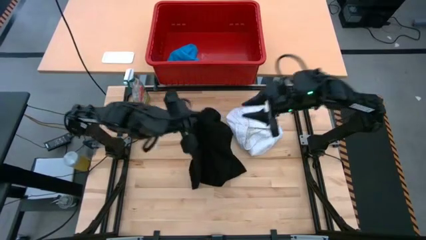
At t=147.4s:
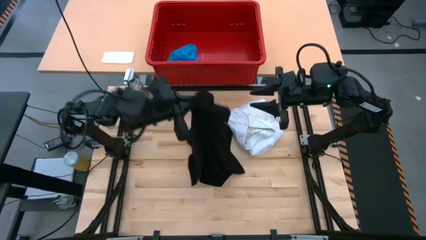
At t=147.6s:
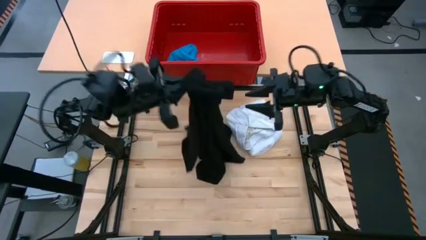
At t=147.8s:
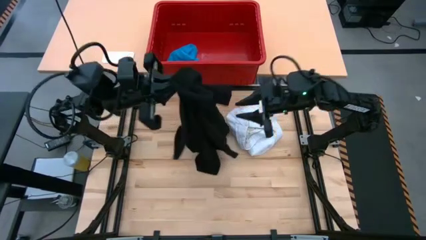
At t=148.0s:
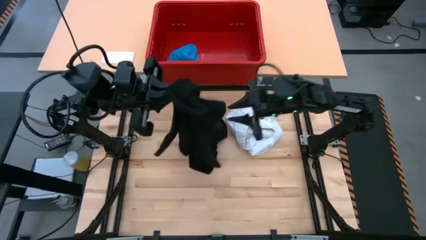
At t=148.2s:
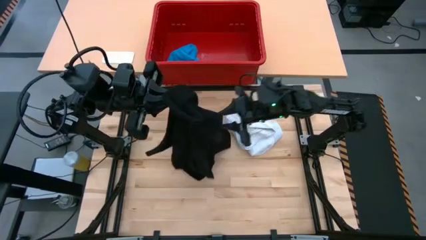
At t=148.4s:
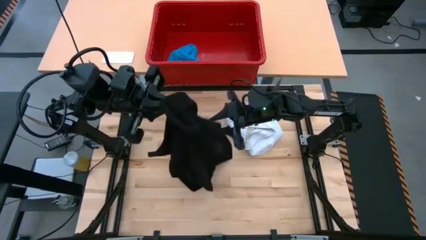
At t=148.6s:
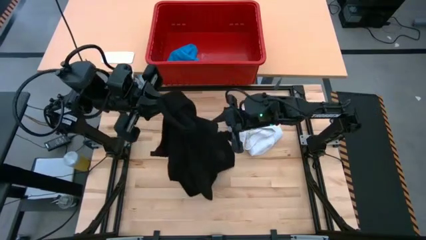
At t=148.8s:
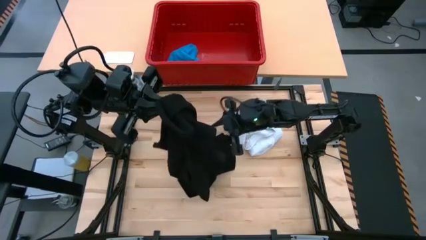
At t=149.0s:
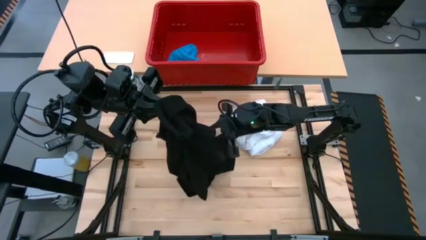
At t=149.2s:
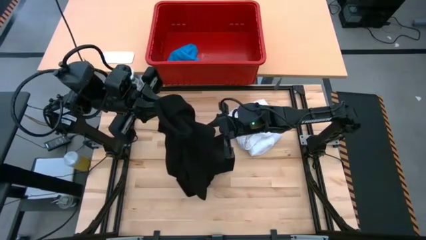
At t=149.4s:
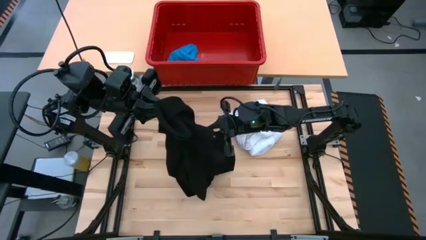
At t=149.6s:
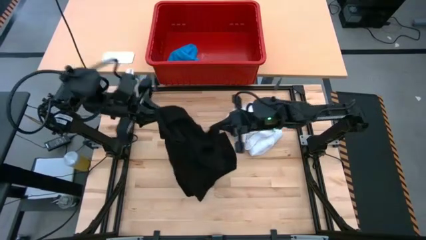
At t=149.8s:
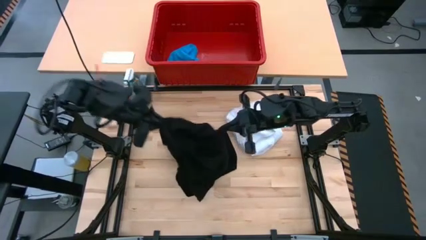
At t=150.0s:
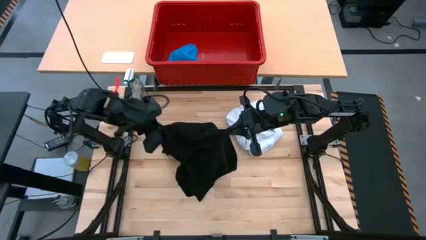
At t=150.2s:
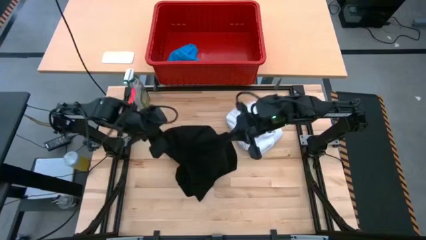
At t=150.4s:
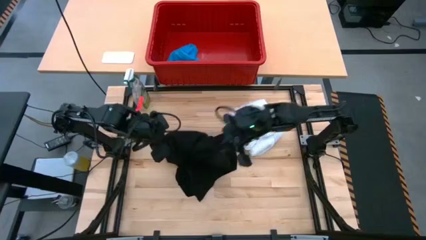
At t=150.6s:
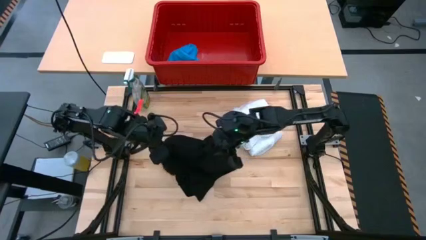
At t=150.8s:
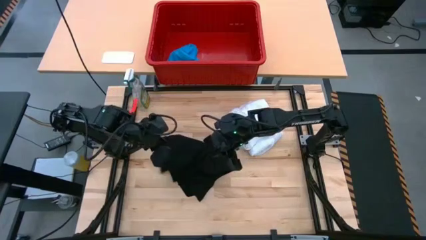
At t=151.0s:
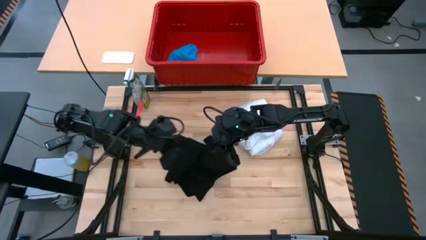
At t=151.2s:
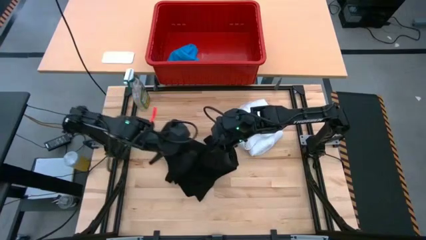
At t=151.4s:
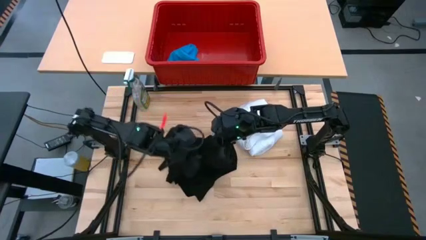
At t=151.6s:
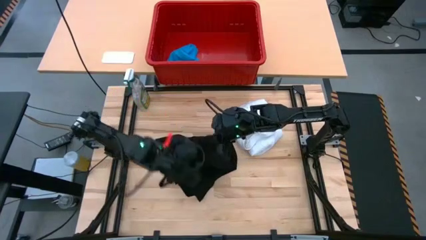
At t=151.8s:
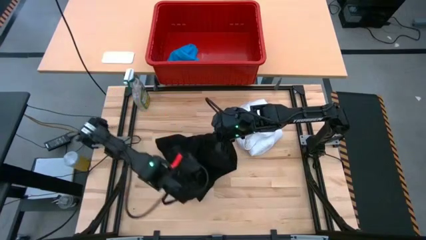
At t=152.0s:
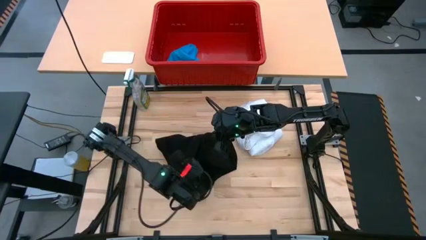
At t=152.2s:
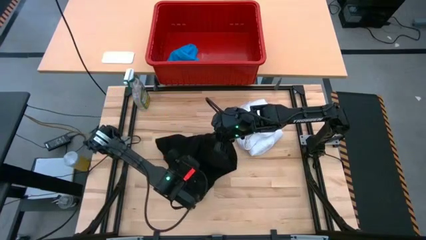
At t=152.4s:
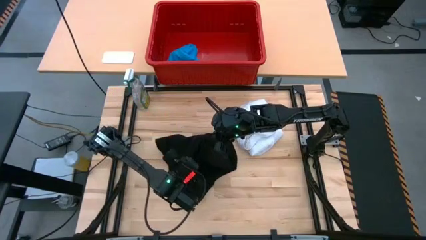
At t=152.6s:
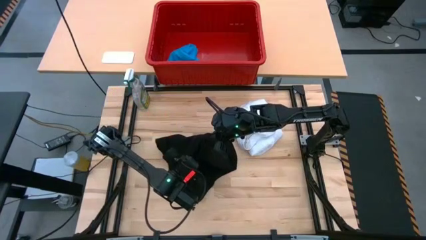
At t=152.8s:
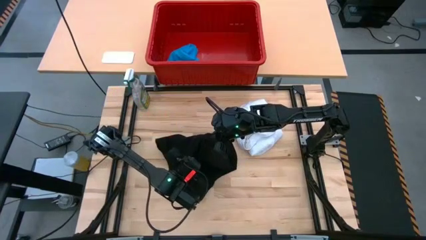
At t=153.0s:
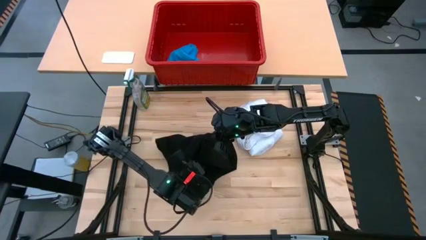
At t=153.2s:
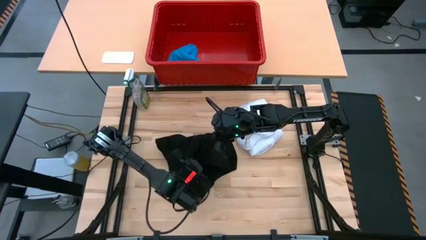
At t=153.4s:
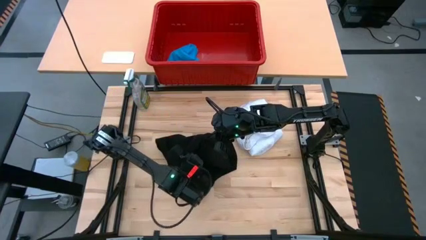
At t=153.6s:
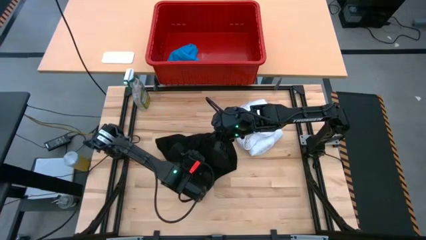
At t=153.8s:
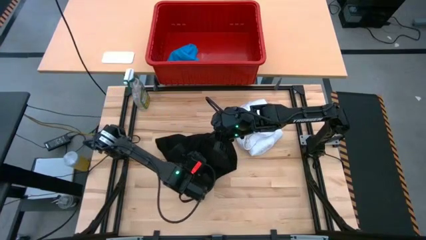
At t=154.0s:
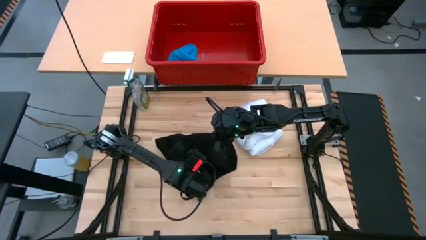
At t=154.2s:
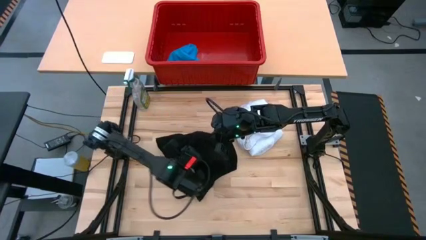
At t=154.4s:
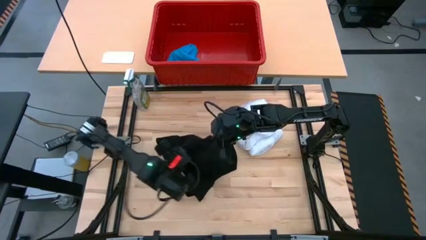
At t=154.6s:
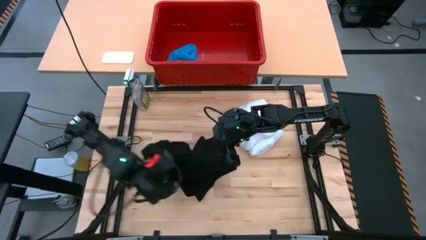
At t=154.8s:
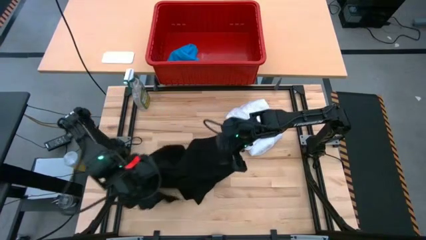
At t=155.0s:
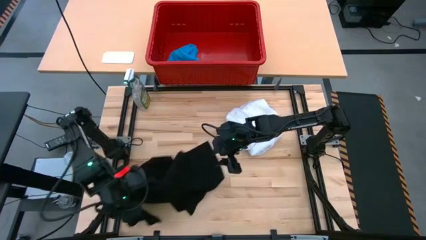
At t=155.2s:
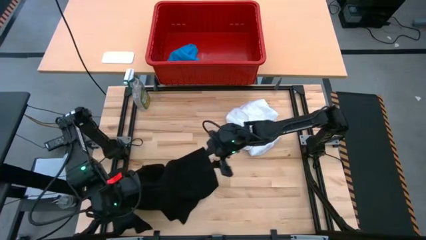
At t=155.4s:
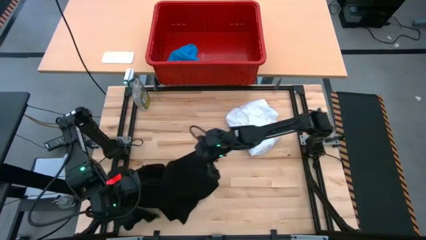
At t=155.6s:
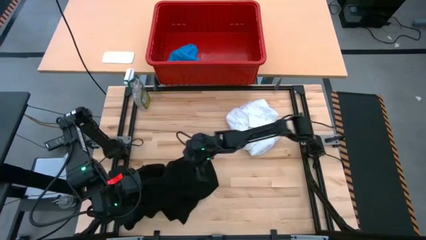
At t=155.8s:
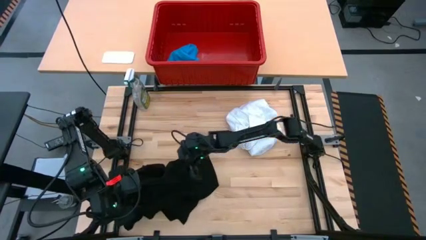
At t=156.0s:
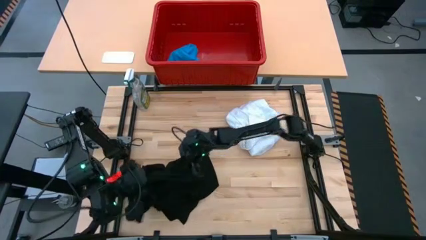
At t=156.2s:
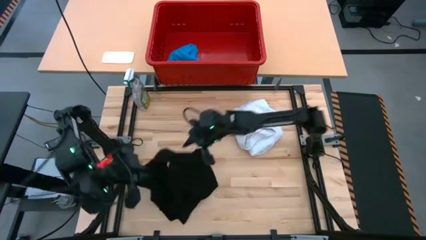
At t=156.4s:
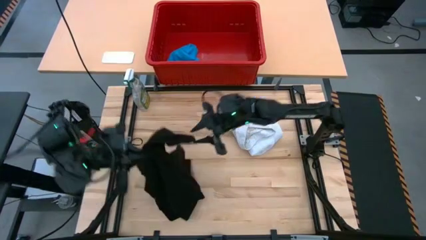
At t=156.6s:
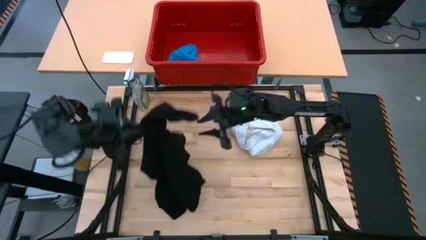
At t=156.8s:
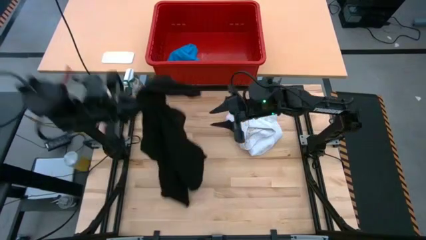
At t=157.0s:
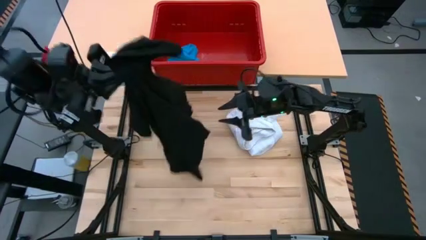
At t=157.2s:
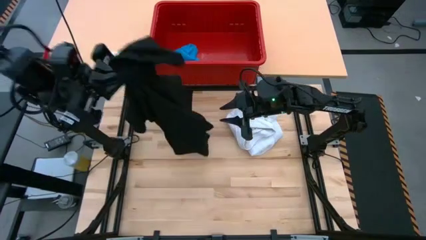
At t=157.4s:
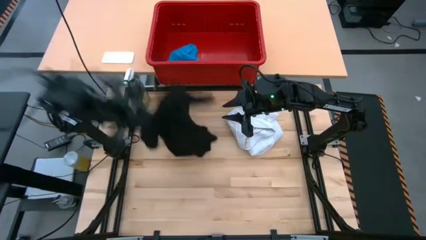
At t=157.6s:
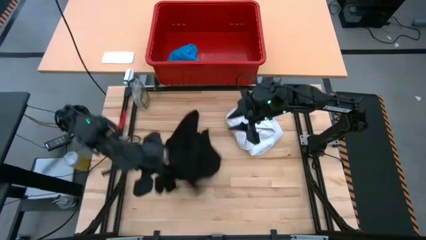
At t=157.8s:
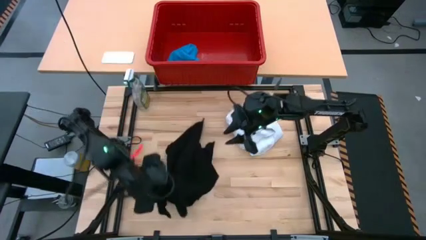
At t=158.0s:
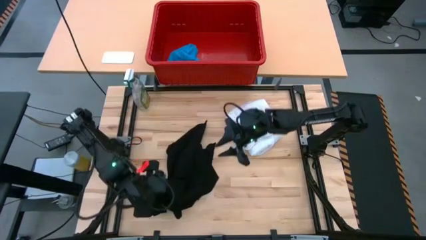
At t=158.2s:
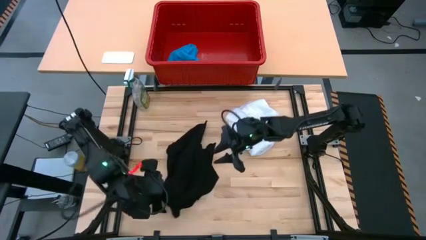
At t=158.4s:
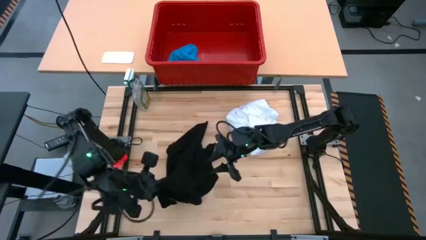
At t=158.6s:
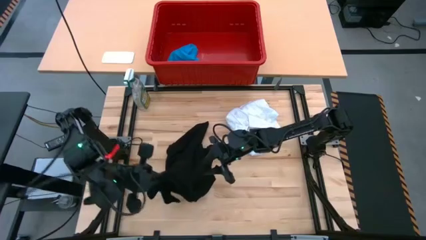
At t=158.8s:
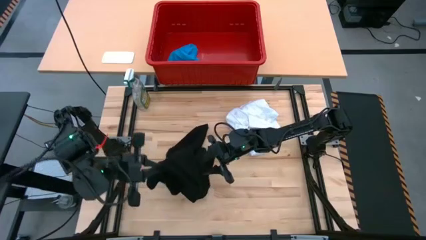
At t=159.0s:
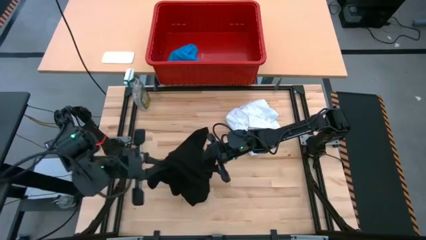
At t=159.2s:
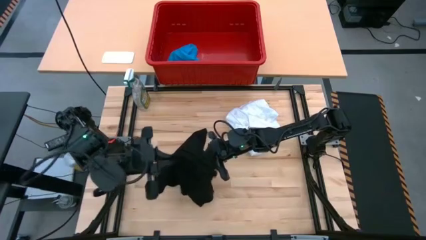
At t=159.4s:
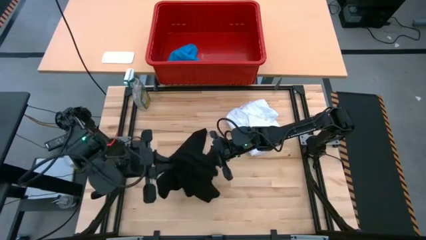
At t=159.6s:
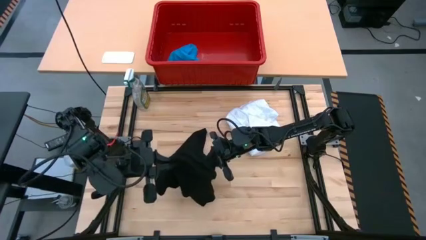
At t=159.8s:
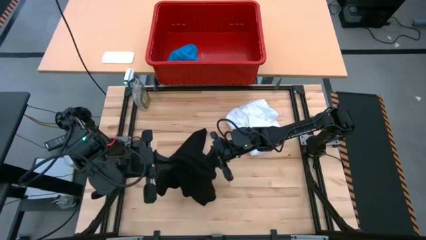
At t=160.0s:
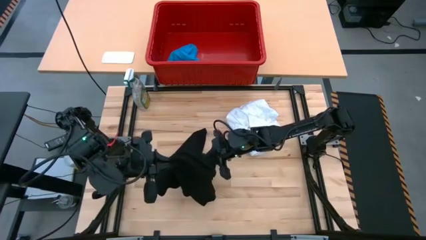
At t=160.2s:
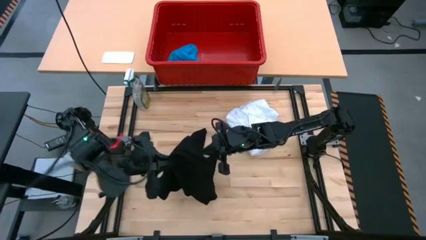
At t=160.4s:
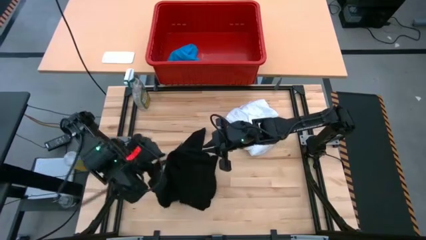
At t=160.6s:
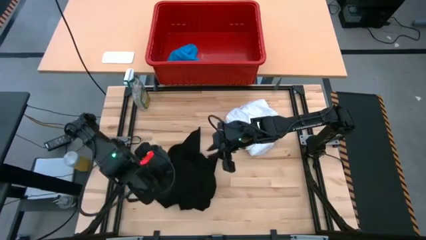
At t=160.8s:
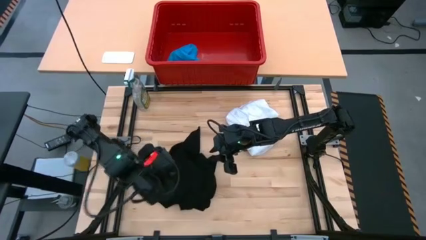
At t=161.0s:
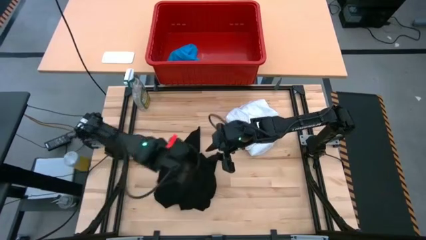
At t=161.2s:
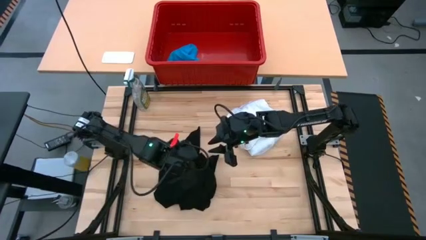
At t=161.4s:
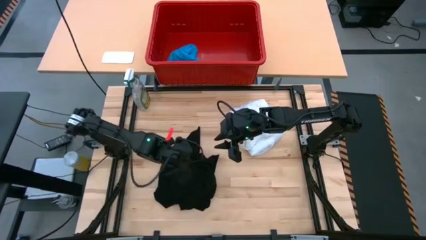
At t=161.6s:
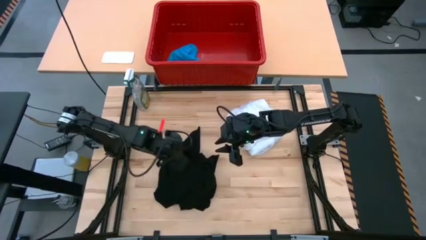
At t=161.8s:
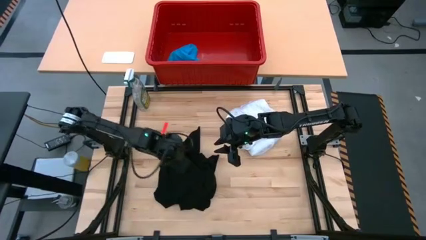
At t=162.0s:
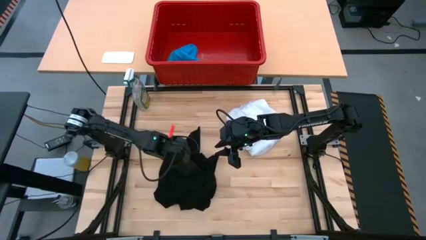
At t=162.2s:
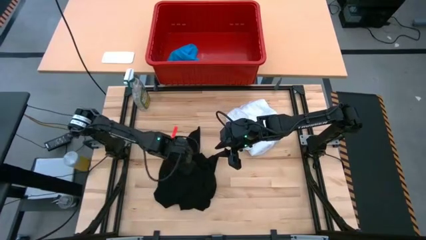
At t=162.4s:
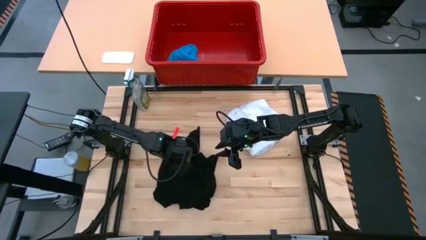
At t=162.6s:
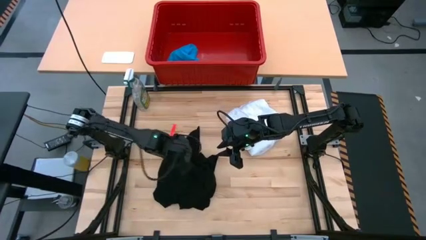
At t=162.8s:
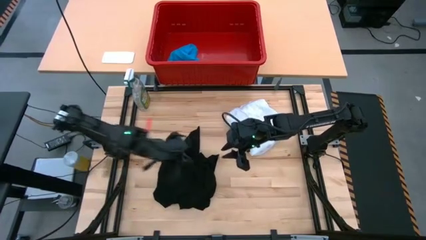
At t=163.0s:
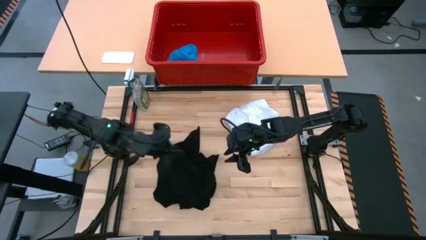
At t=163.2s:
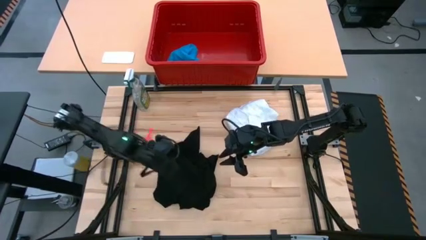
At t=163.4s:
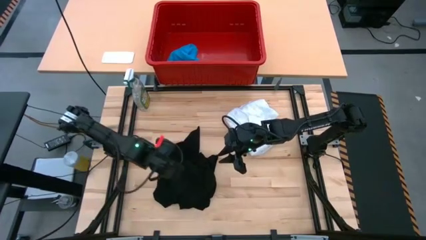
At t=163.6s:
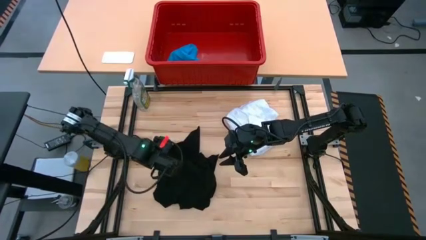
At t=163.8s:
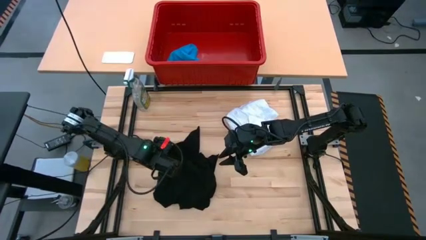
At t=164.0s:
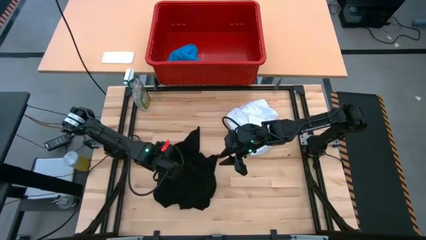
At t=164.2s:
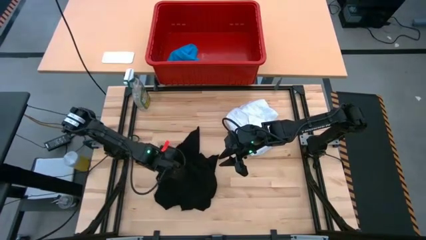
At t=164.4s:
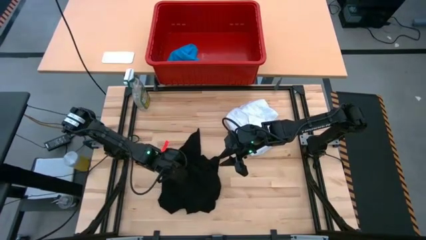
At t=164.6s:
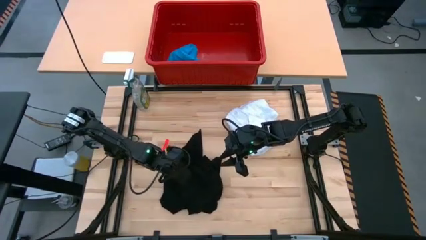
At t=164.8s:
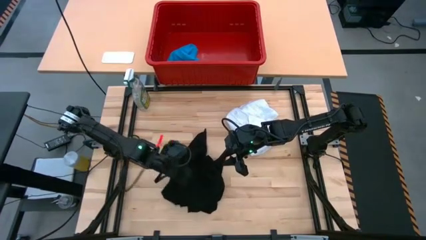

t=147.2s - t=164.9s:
Task: Fold laundry
Fold the black shirt
